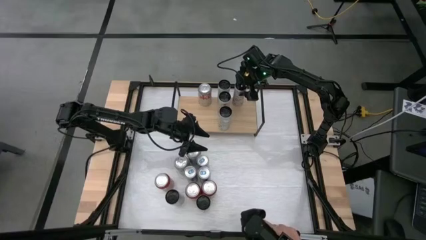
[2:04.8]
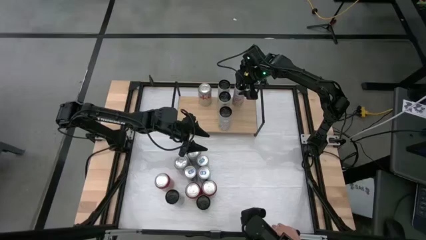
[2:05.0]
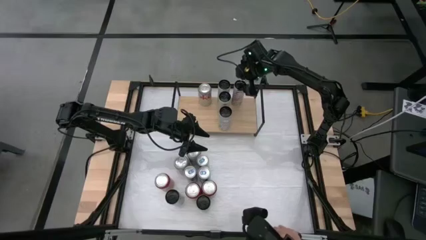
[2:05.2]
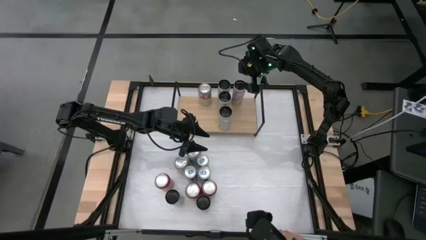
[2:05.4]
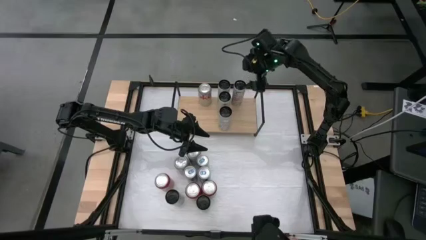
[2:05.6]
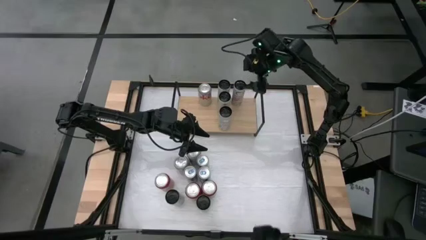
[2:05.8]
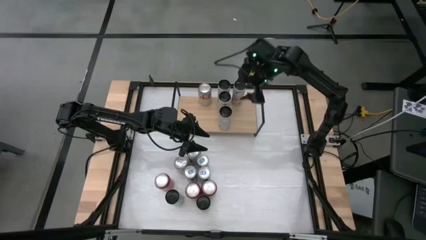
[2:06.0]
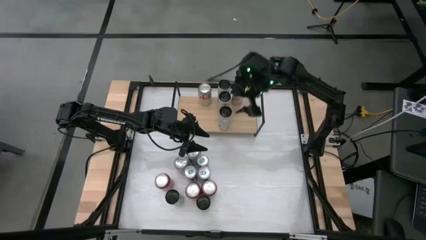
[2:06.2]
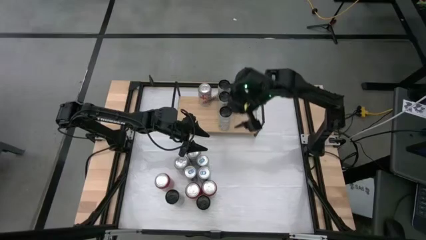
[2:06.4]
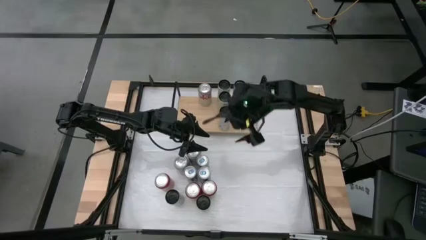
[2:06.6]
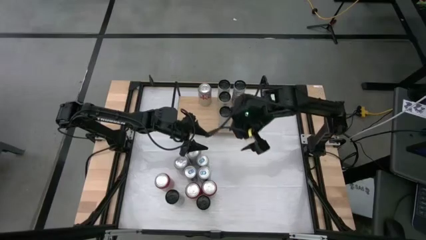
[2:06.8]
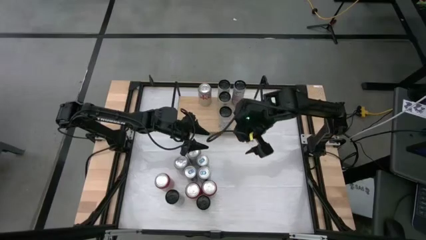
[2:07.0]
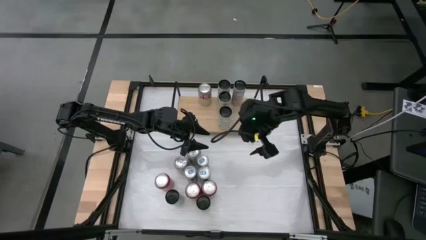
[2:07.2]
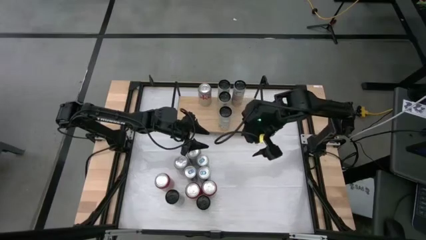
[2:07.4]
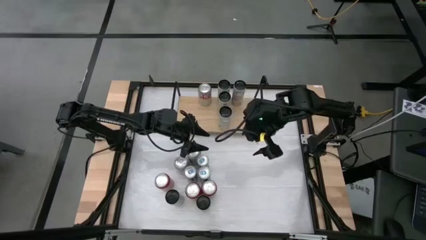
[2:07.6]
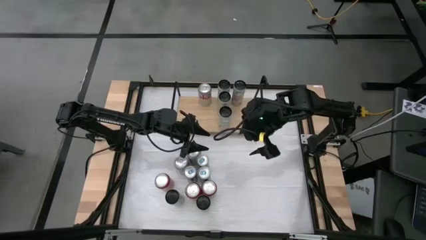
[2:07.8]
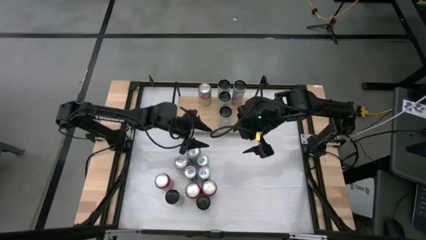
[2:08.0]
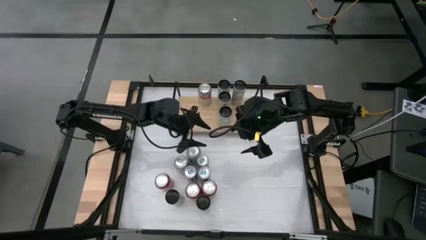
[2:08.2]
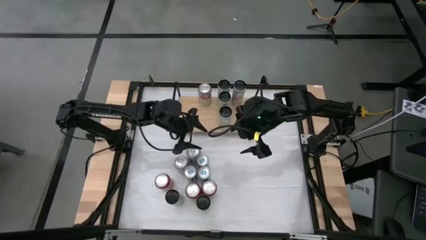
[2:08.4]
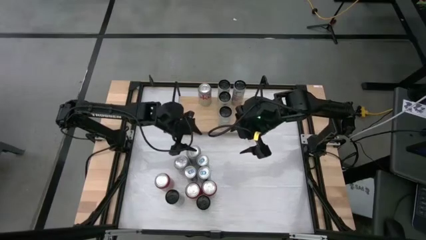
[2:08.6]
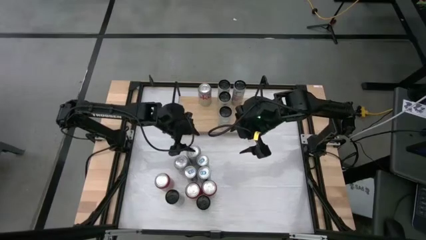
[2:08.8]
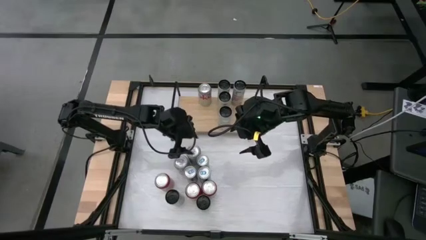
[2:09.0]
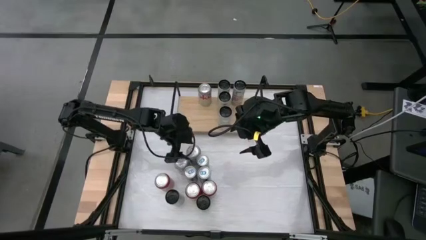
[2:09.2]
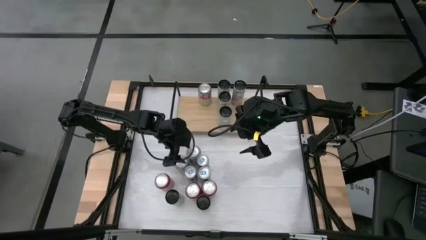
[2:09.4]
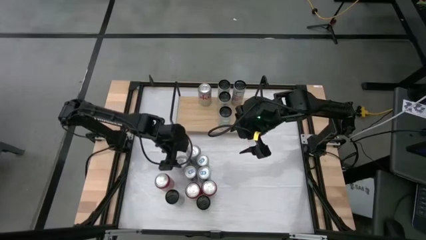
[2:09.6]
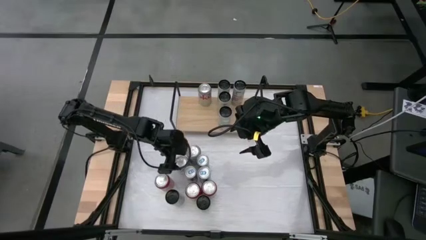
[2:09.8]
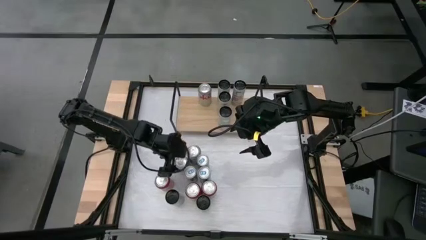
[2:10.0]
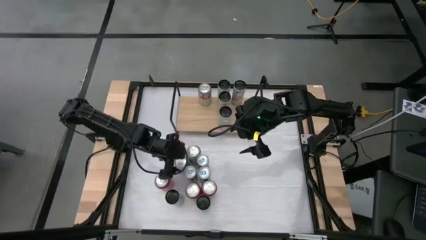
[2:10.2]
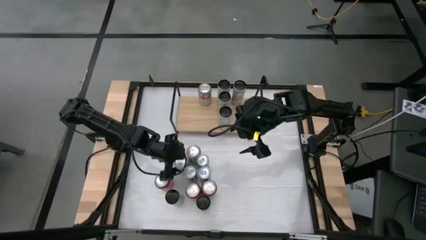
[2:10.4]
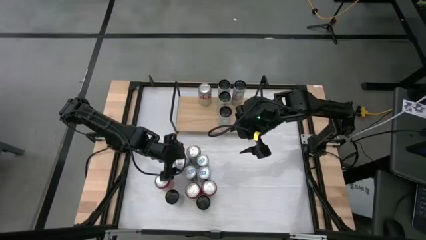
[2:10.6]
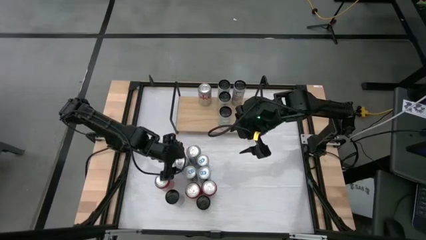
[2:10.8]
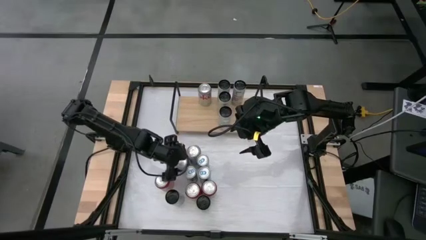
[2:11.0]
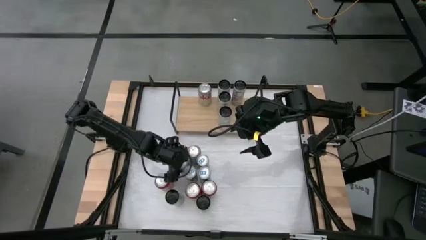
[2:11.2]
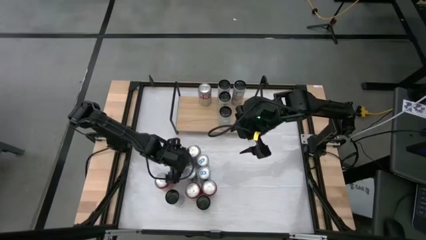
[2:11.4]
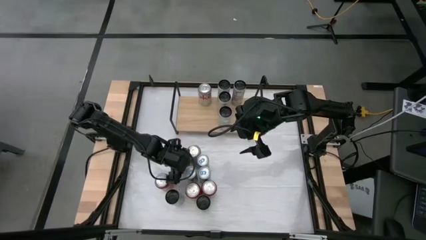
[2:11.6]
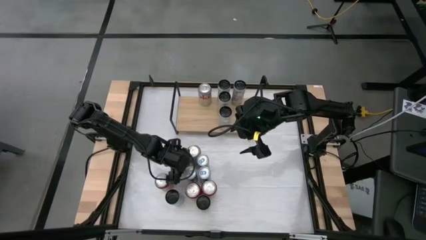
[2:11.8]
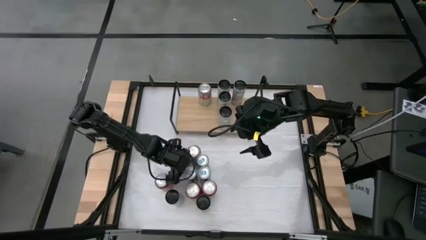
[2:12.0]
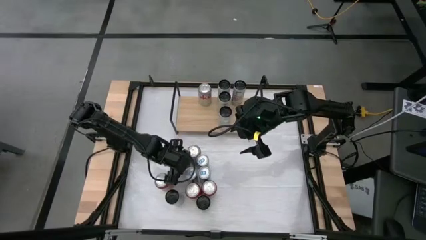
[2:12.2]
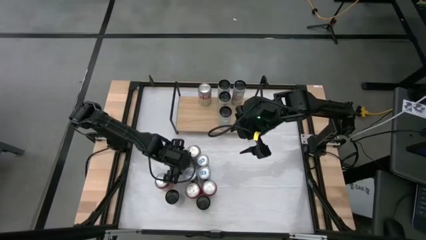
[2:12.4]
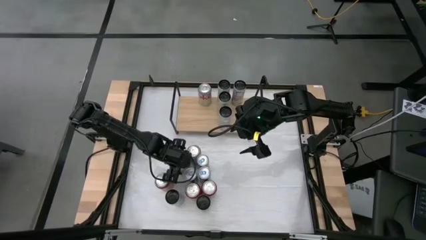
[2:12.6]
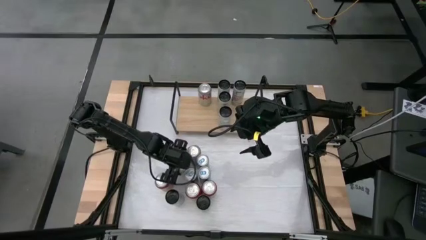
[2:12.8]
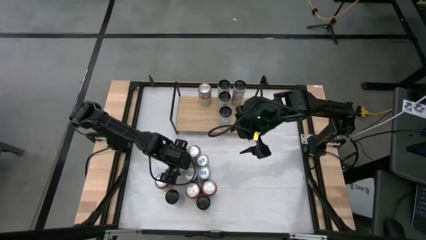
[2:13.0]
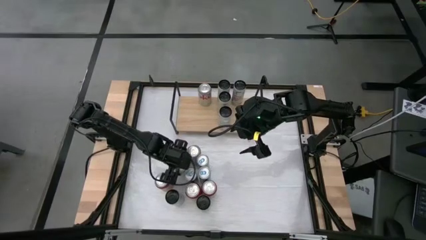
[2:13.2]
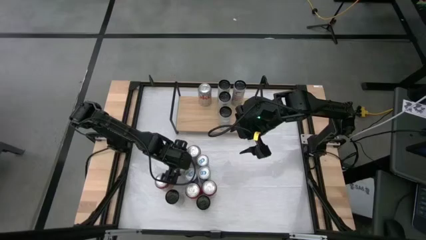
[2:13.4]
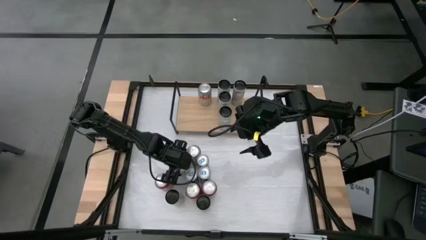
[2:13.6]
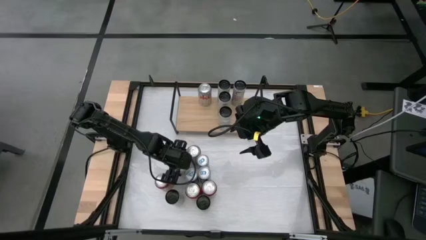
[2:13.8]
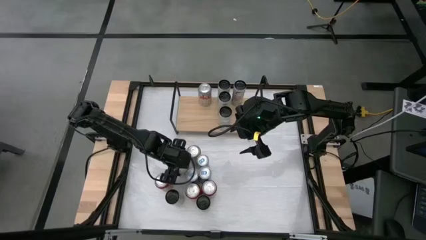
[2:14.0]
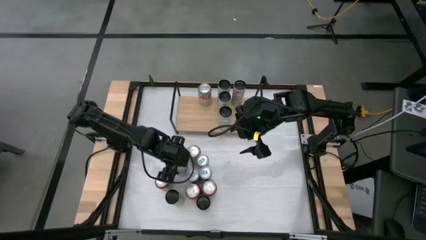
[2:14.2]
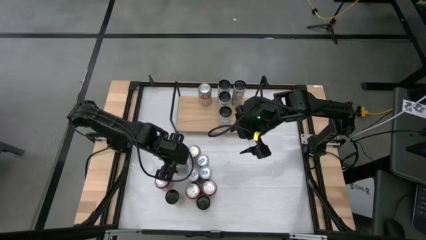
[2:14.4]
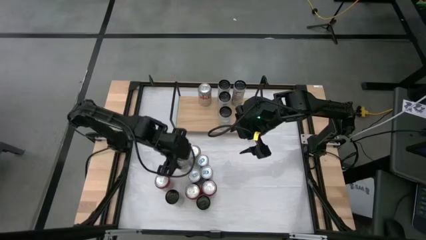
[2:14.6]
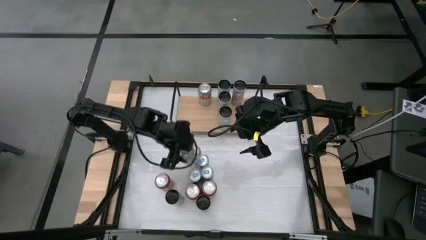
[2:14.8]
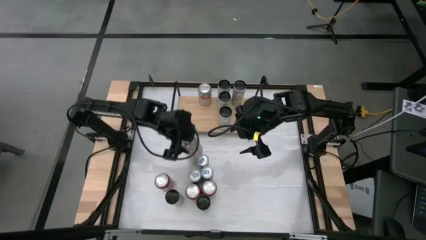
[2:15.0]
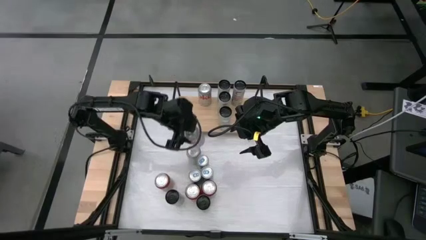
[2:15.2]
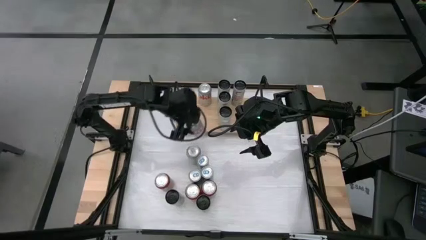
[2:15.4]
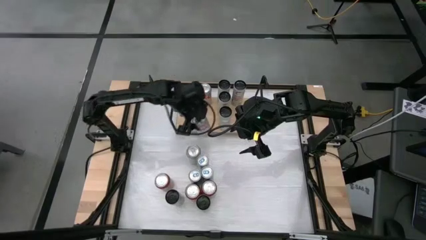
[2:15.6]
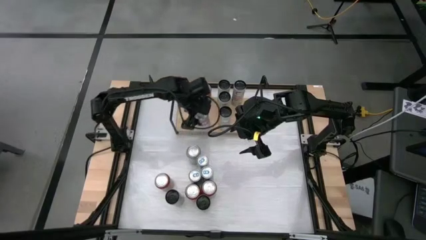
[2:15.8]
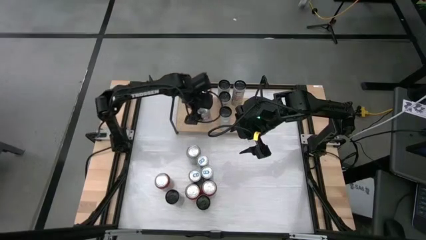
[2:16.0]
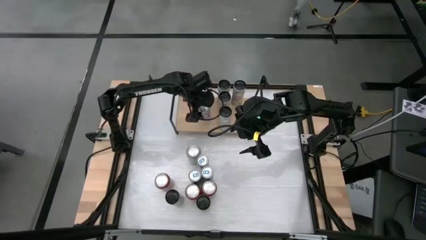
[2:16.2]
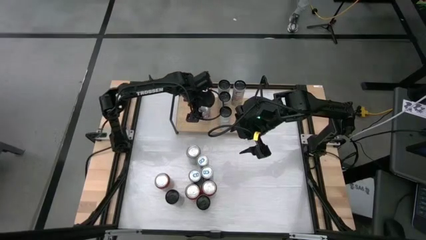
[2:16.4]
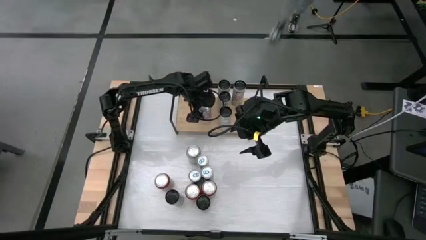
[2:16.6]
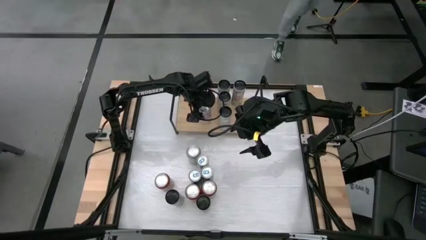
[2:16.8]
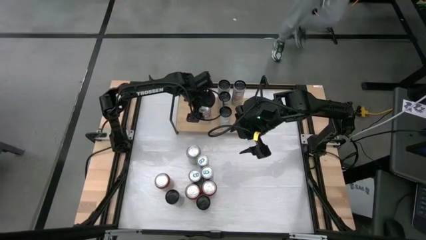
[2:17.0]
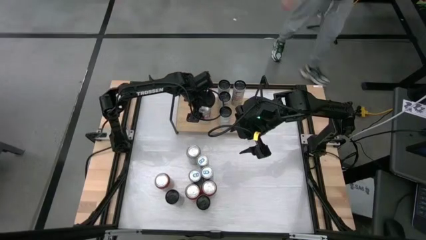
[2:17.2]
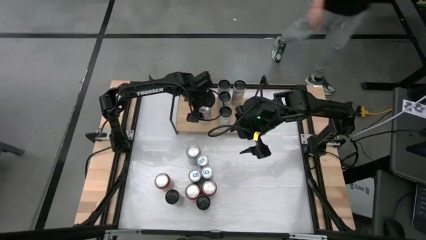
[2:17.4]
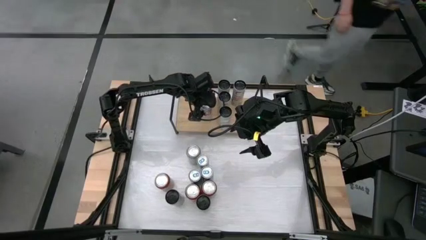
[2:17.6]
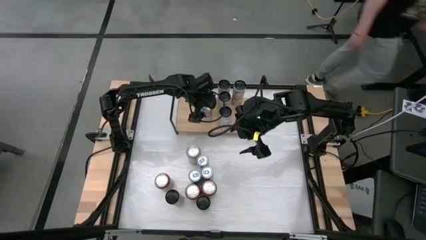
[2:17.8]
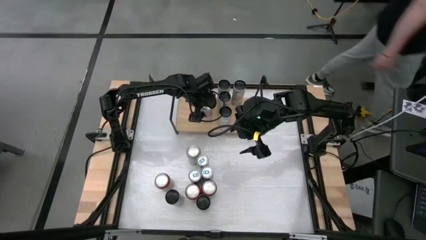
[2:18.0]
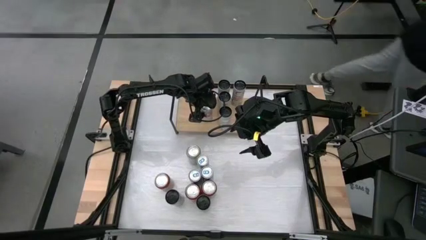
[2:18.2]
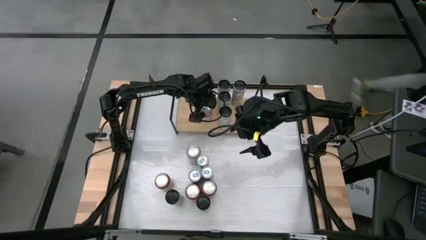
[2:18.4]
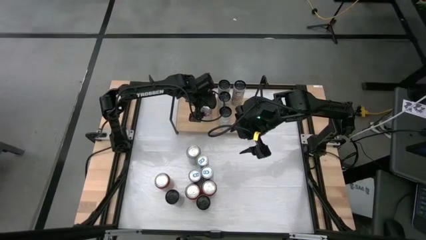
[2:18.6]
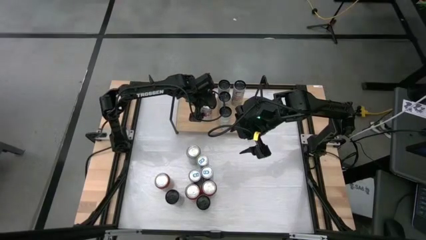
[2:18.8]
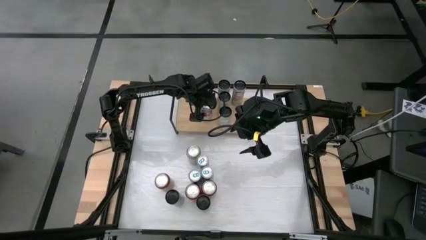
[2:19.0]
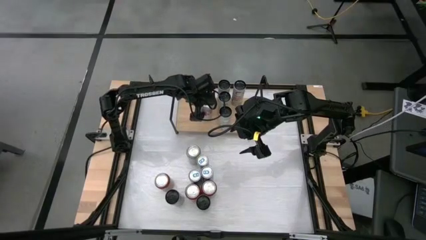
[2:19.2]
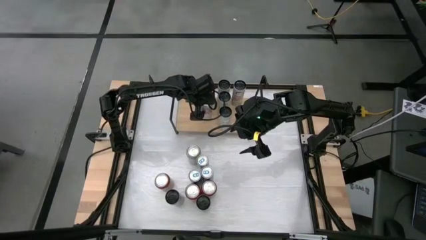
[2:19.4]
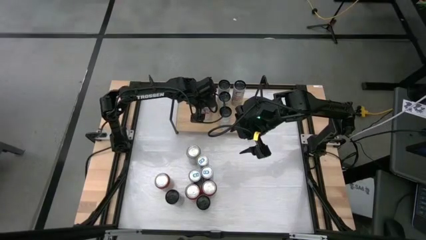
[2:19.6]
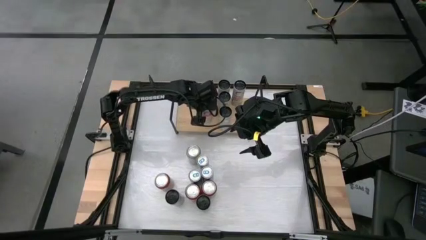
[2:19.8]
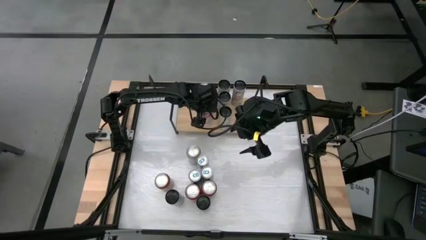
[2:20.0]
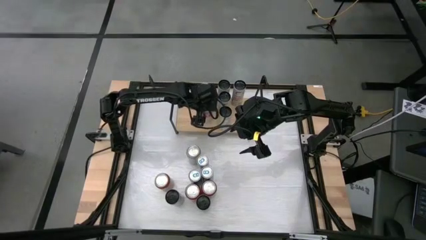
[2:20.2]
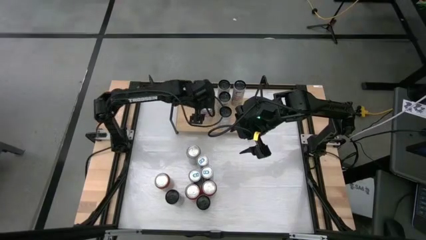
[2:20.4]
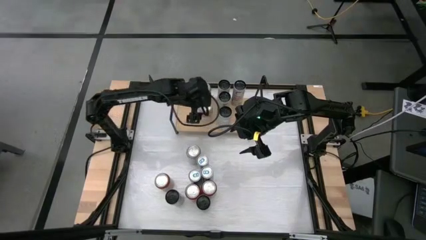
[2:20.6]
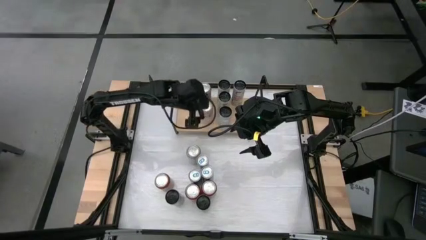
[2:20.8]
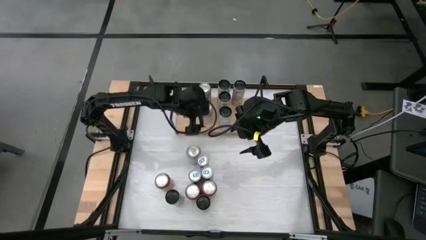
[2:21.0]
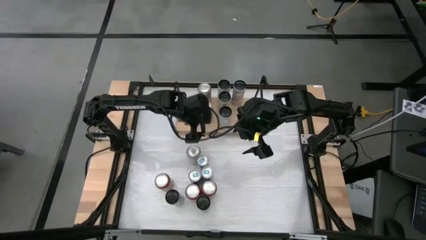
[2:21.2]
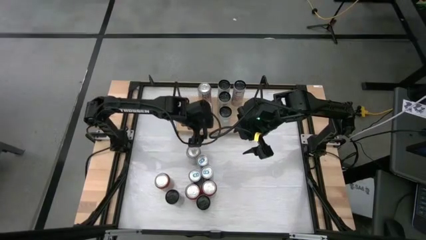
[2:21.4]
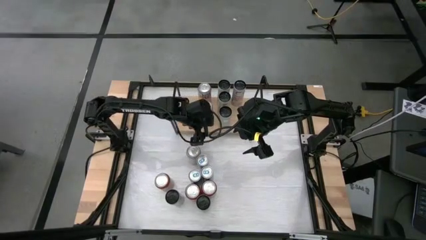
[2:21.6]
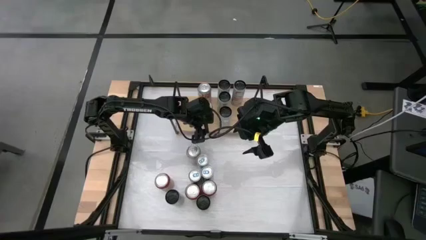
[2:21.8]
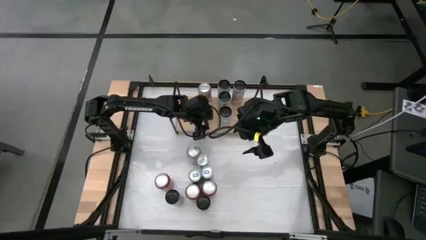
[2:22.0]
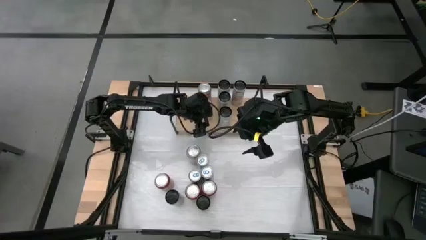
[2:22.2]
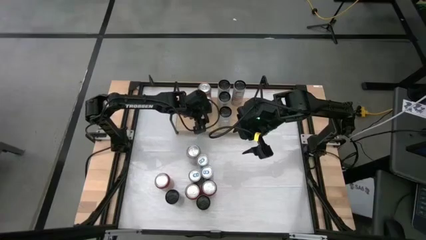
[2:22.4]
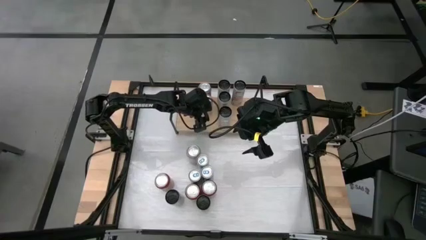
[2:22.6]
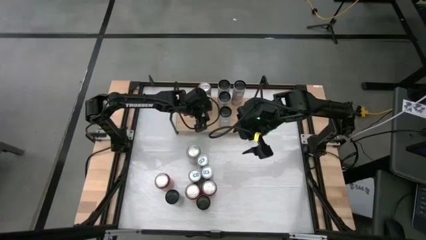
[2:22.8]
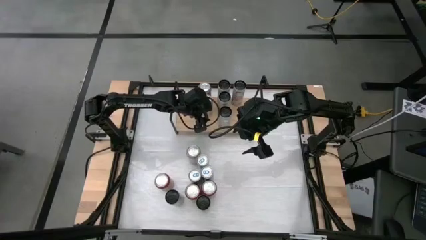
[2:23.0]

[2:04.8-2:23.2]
Task: Place canned beverage on shelf
Put the red silver soda can onto the shelf aligned with the other red silver soda can
